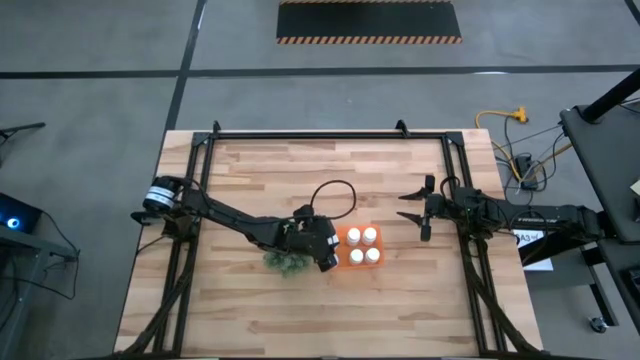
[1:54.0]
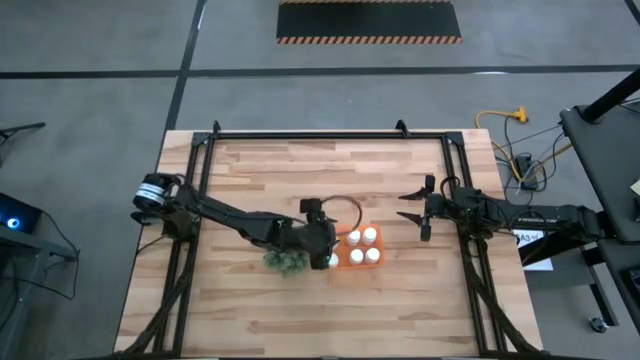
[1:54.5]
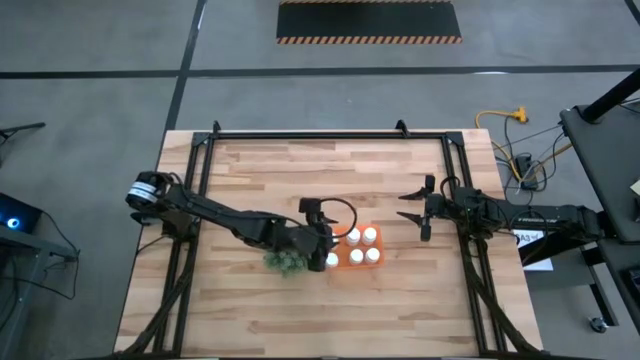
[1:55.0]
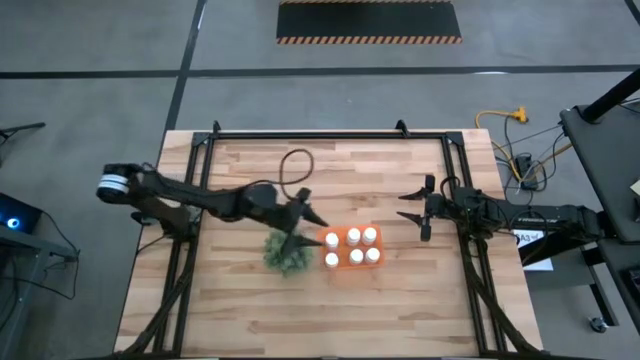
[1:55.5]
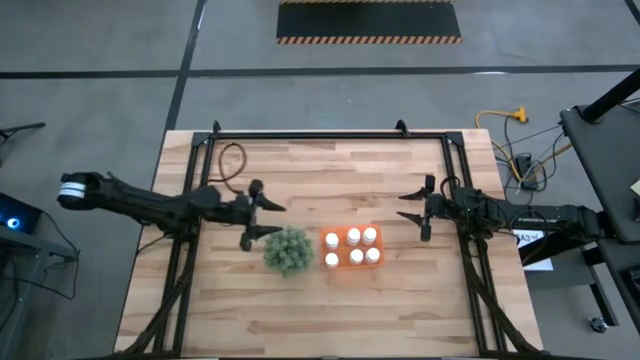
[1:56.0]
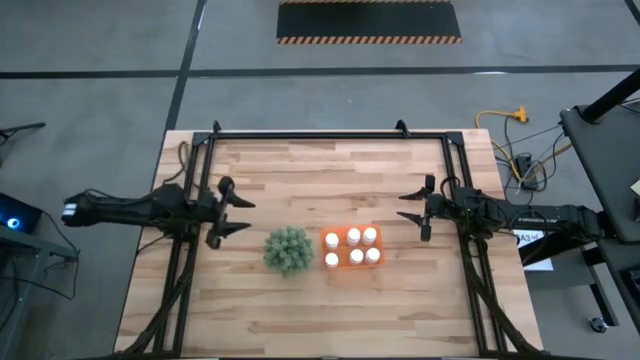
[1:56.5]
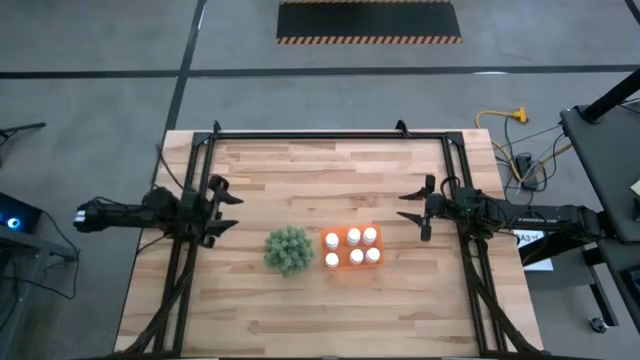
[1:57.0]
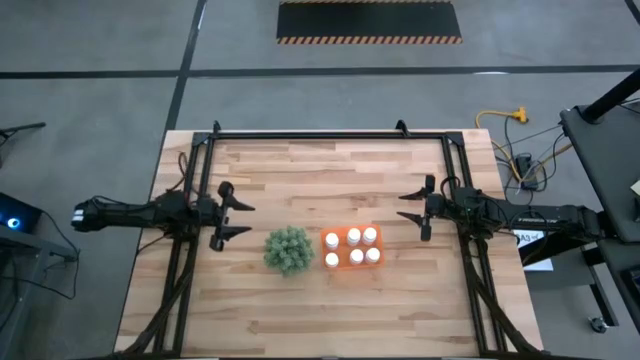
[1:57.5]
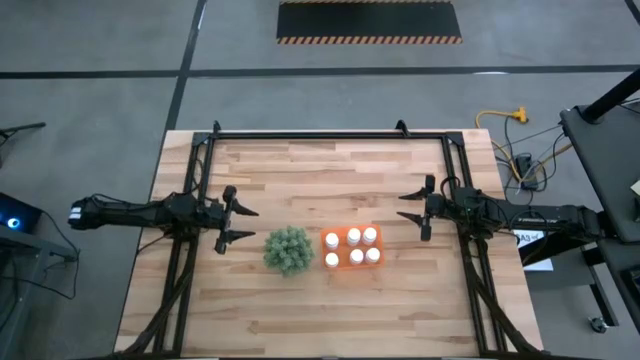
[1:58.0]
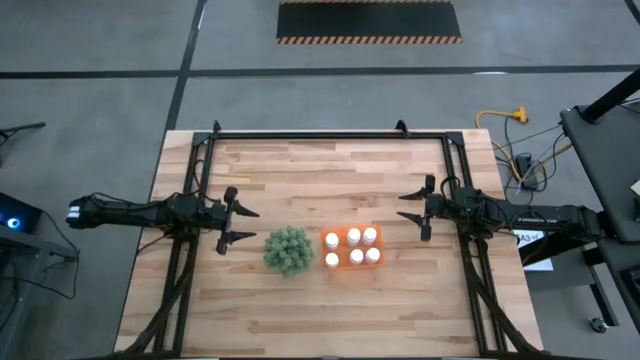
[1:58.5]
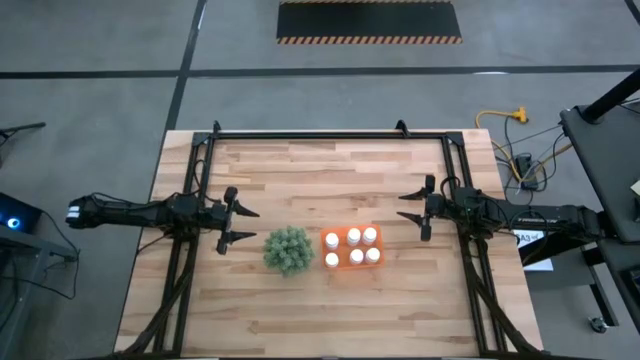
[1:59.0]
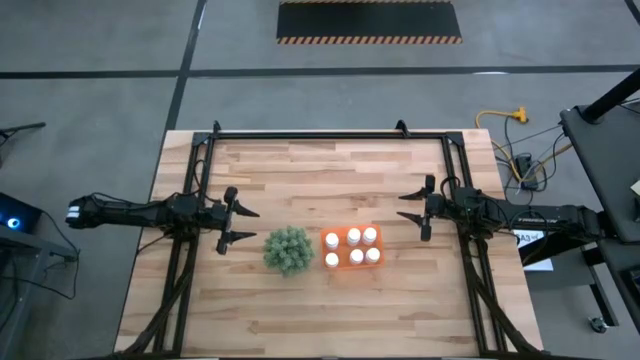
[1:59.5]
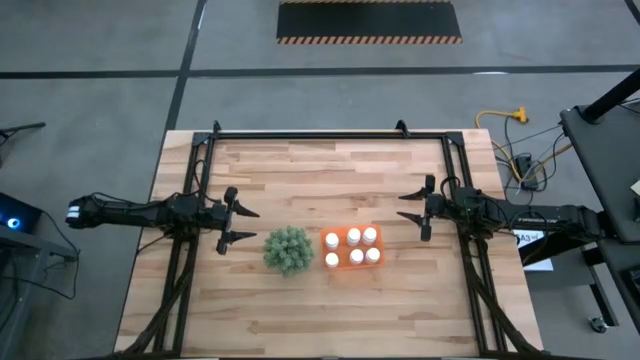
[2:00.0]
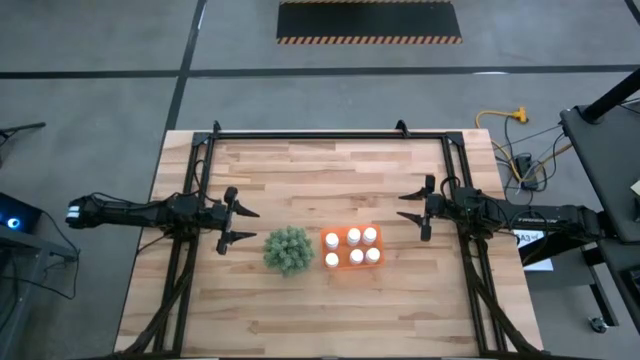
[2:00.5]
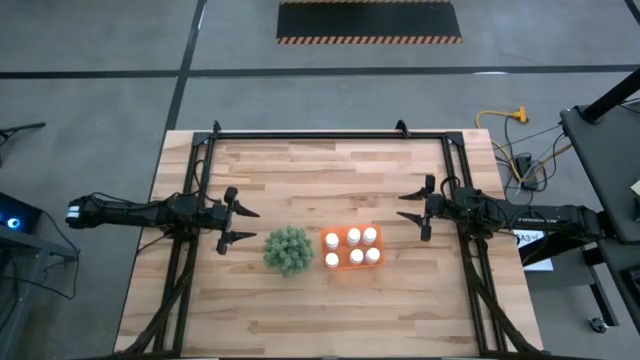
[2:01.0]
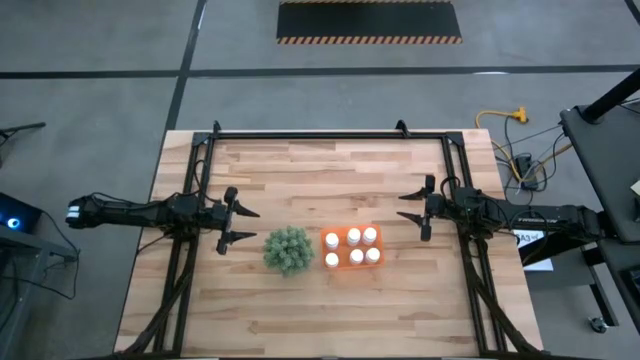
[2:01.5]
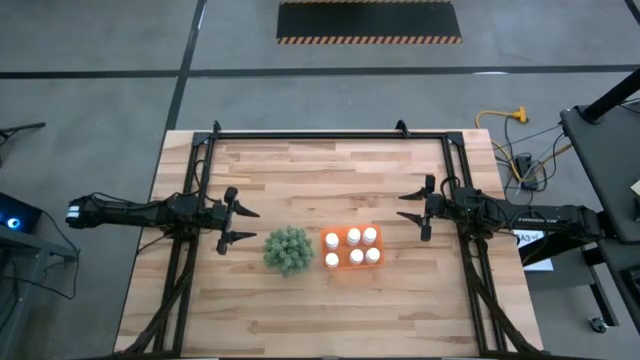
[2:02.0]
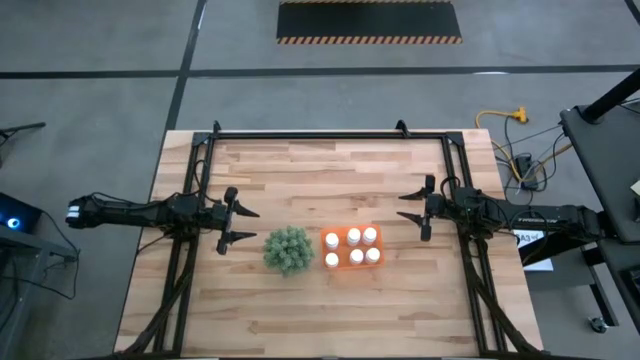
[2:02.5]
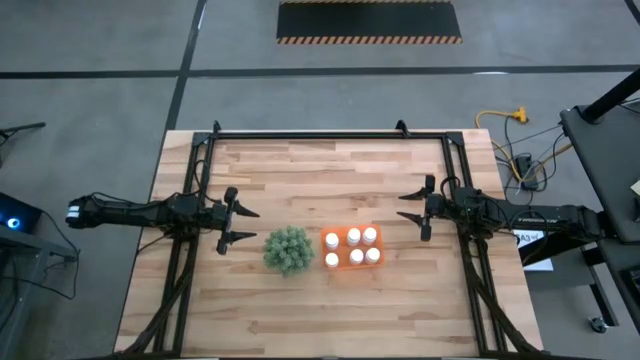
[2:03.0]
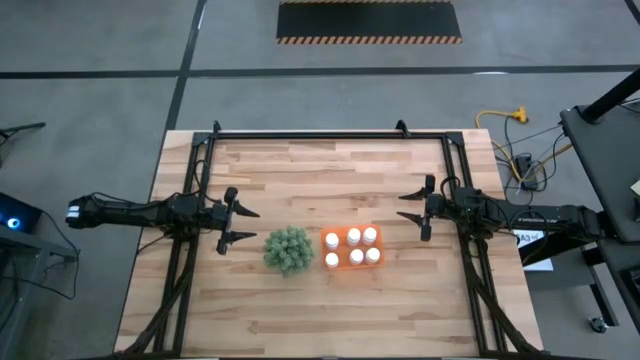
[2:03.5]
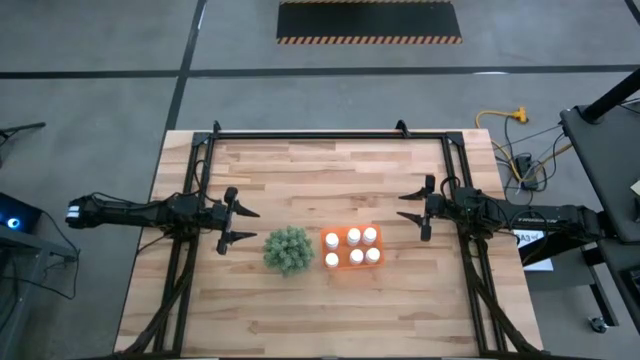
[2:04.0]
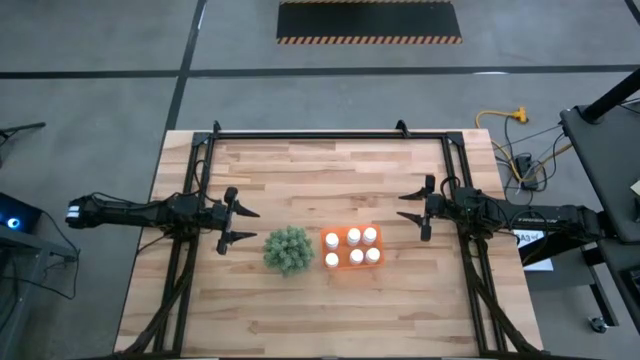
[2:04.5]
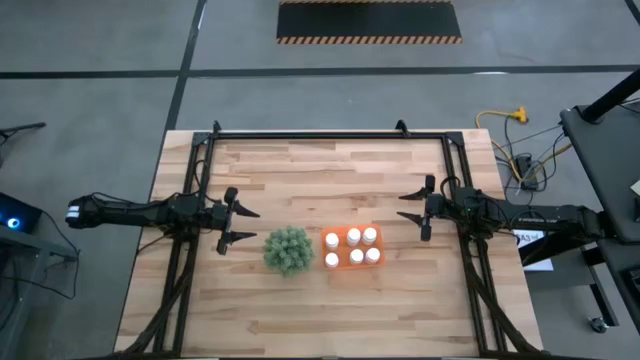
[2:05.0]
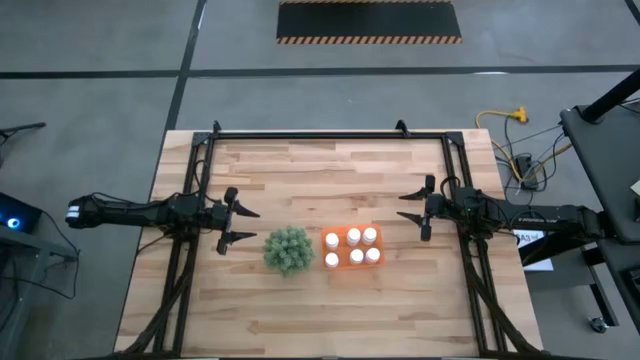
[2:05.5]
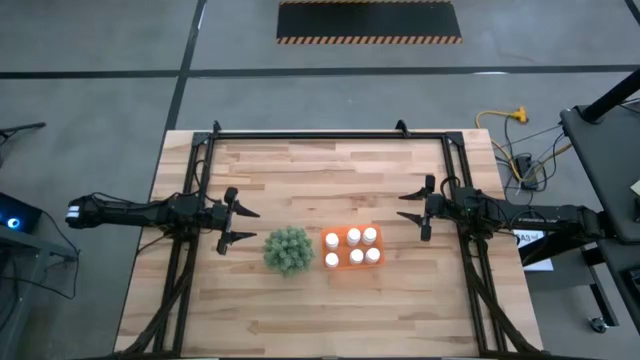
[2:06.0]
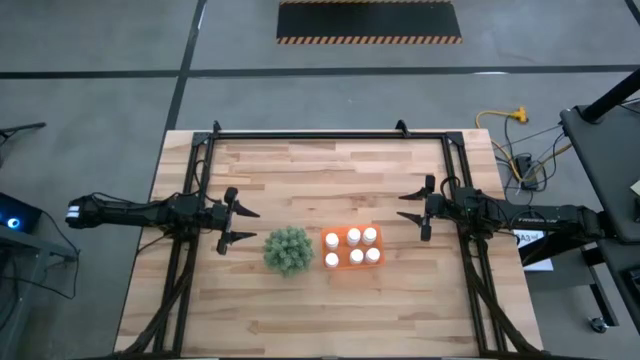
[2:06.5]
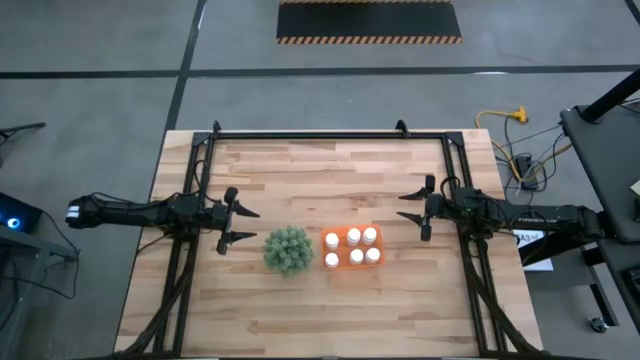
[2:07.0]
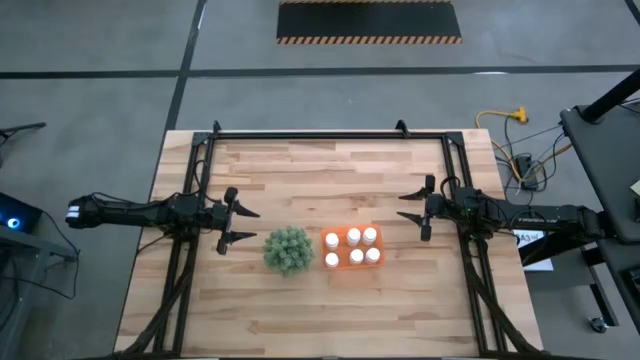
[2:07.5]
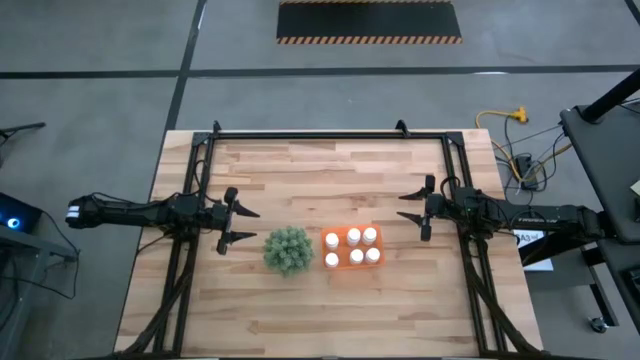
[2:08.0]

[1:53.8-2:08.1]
Task: Pick and place pill bottles into a basket
Return to Home Position

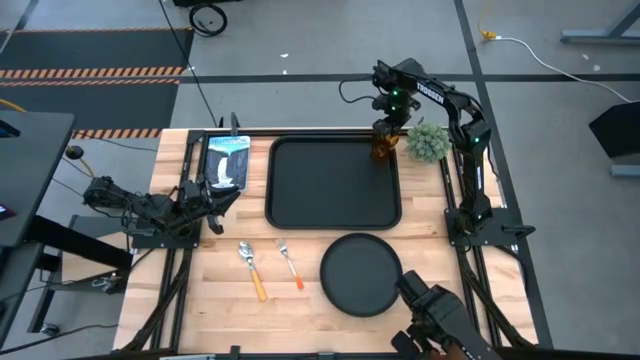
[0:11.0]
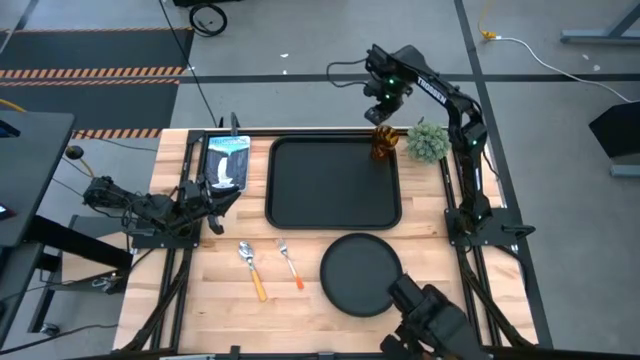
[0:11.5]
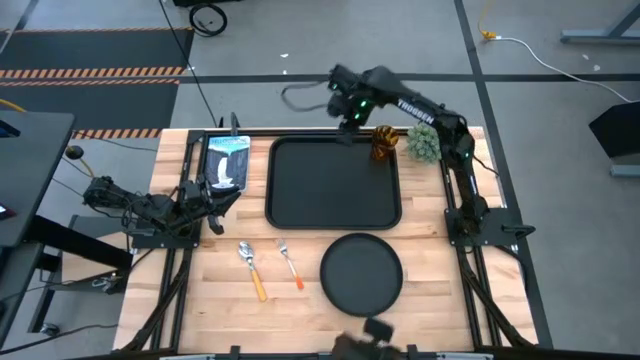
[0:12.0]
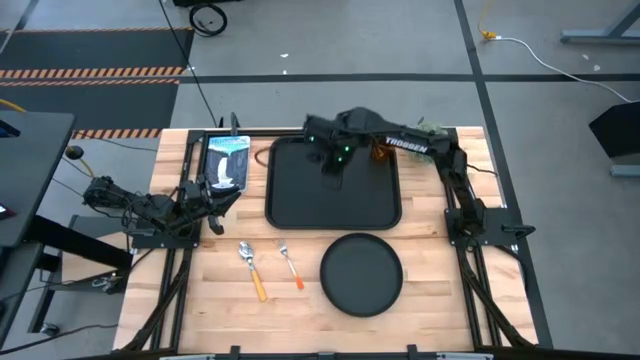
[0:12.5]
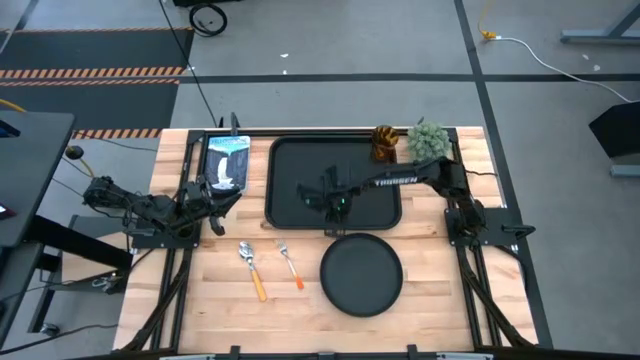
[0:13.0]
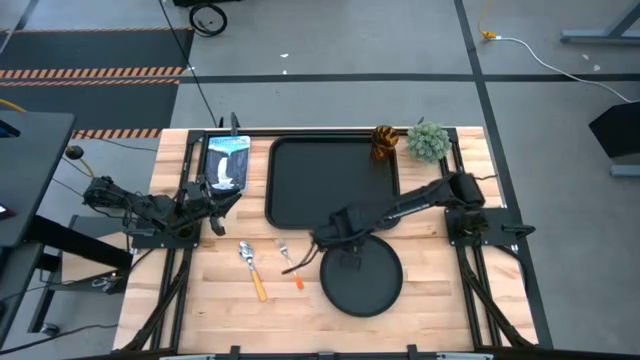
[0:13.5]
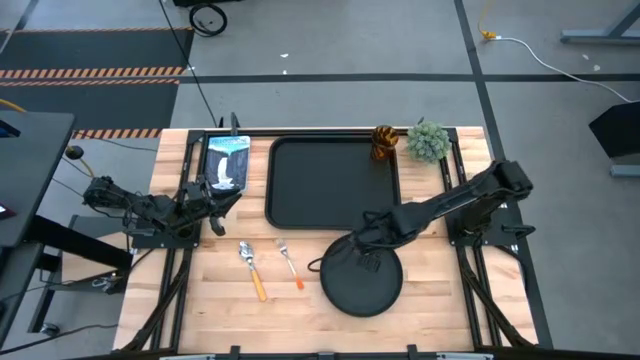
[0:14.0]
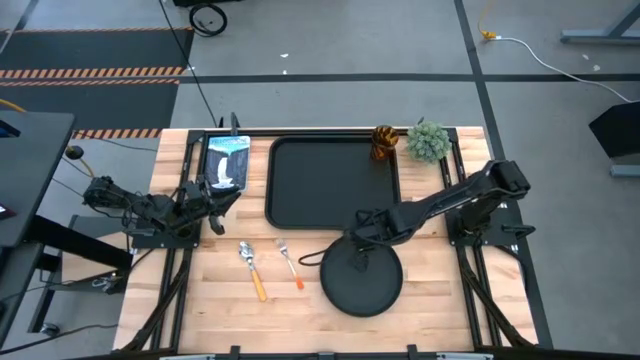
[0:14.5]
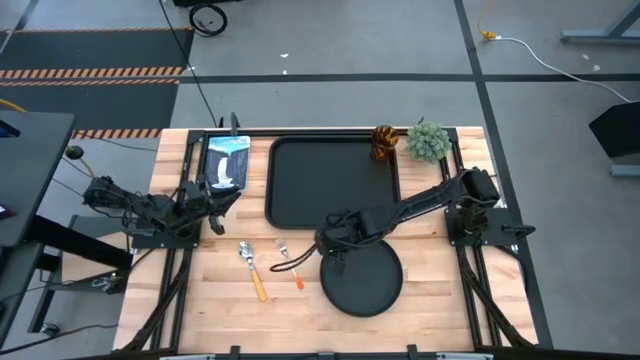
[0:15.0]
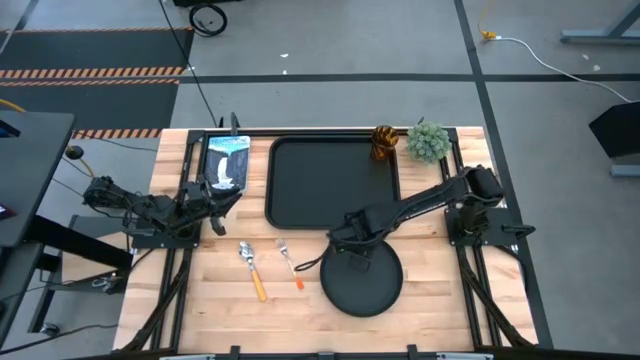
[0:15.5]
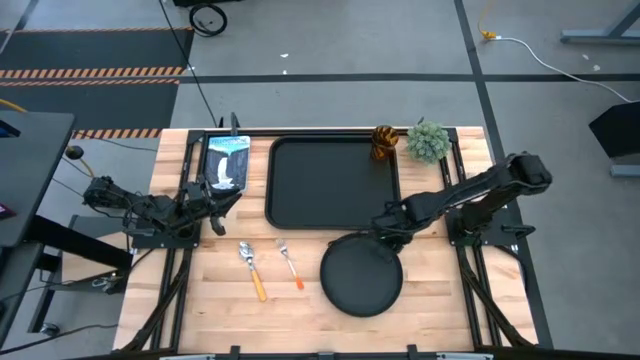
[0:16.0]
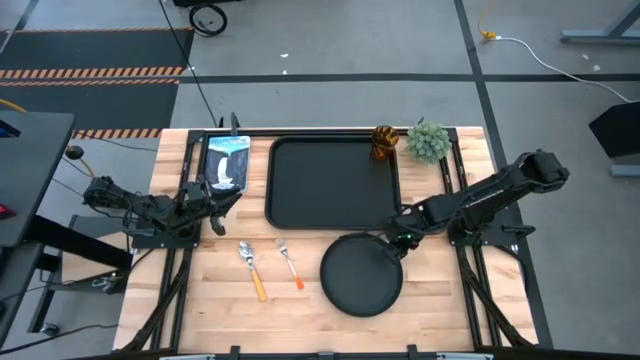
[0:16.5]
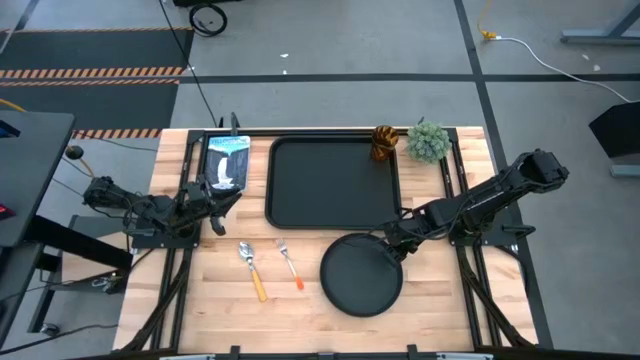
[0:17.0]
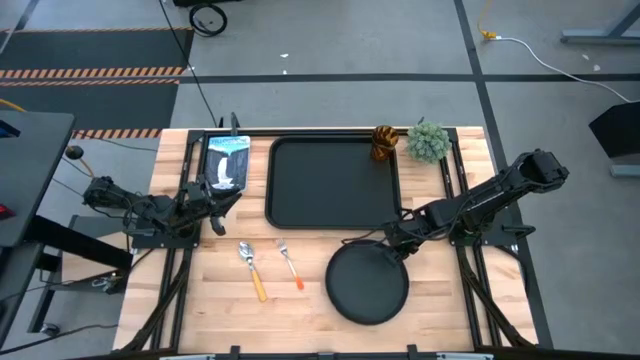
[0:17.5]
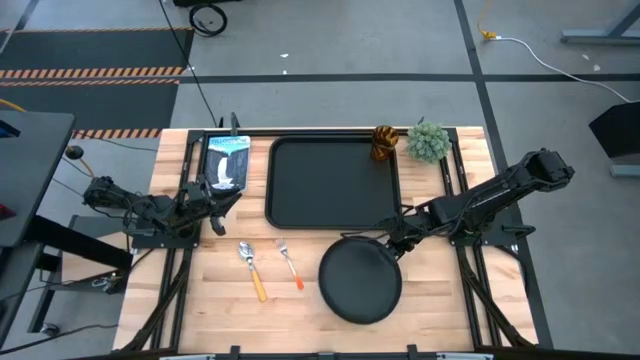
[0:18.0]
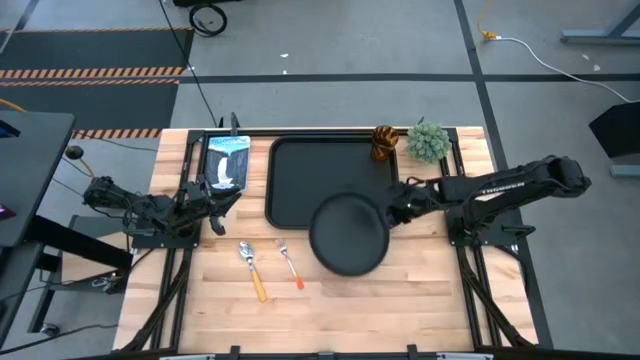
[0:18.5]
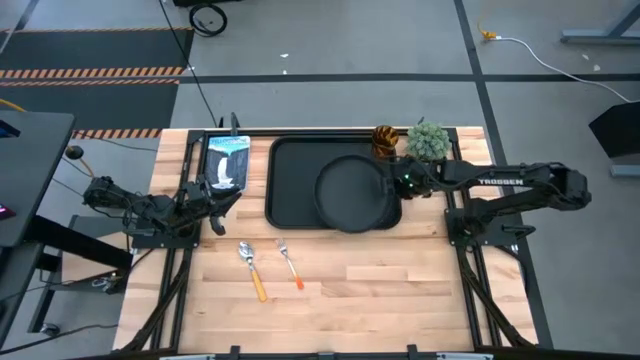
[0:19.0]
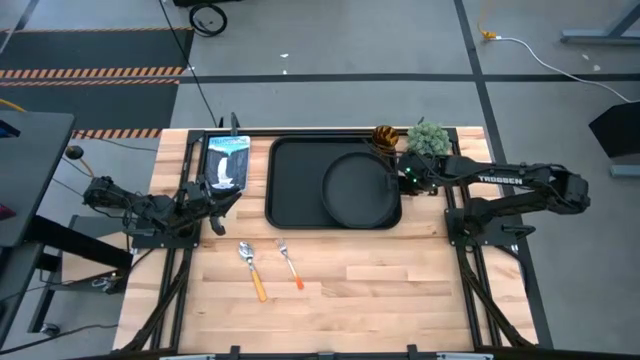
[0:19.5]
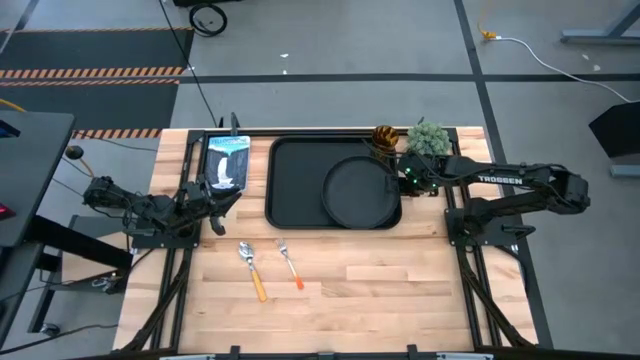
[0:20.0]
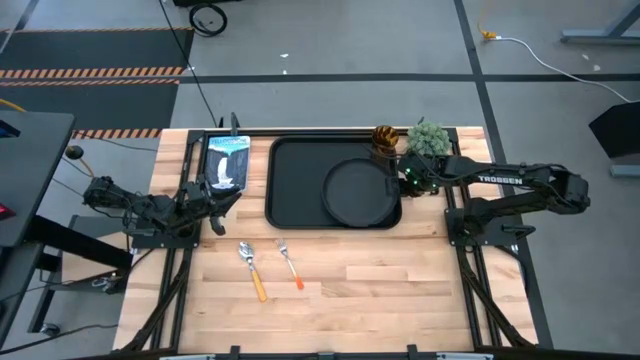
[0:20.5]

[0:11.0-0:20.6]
Task: Pick and place plate/cup/fork/spoon on tray
Put the black plate on the black serving tray to the bottom of the brown glass
